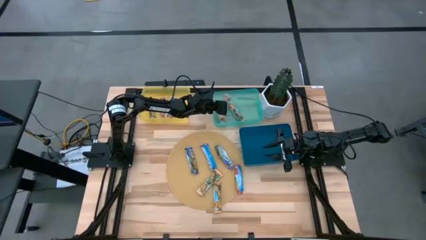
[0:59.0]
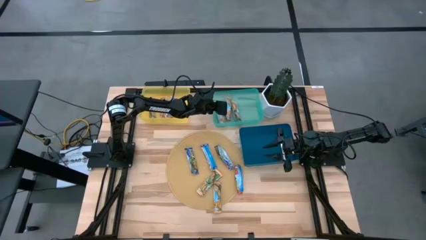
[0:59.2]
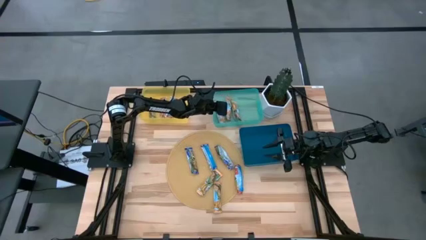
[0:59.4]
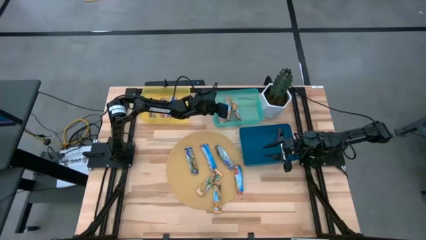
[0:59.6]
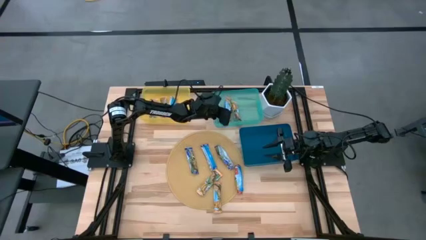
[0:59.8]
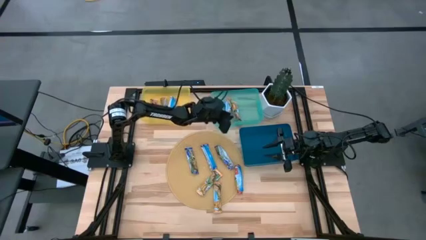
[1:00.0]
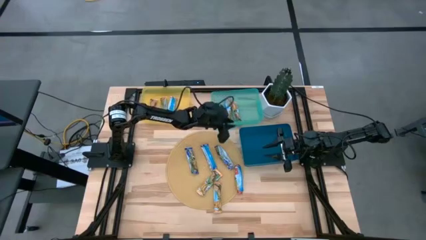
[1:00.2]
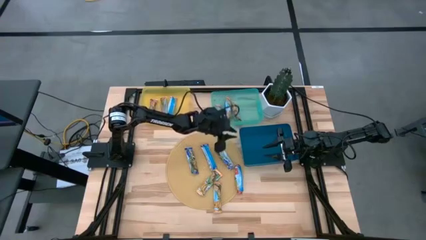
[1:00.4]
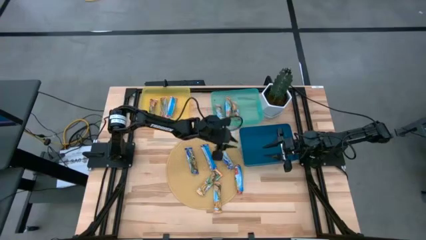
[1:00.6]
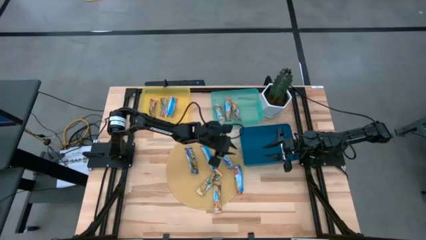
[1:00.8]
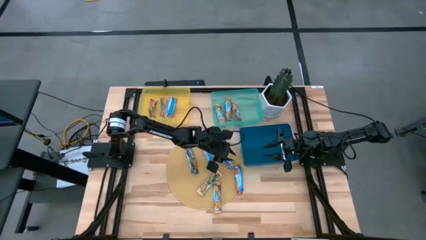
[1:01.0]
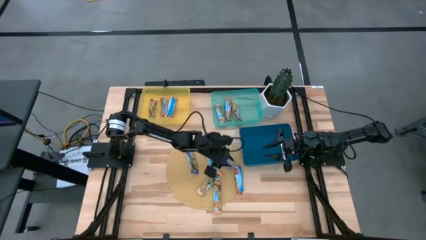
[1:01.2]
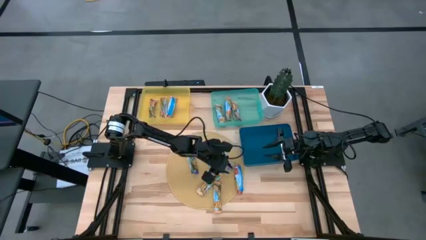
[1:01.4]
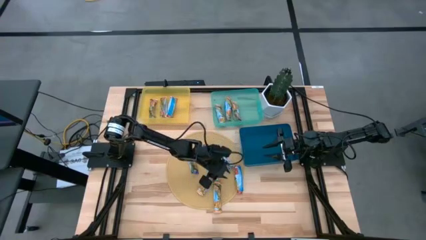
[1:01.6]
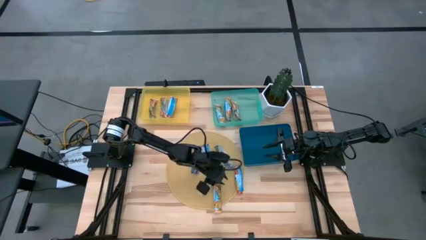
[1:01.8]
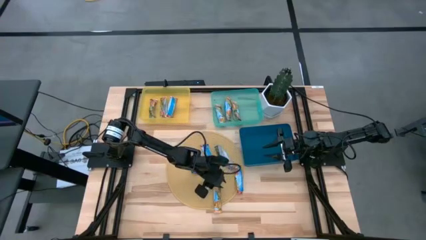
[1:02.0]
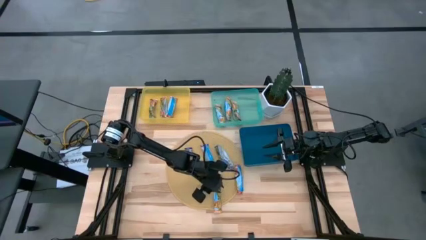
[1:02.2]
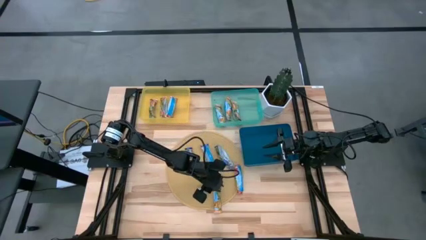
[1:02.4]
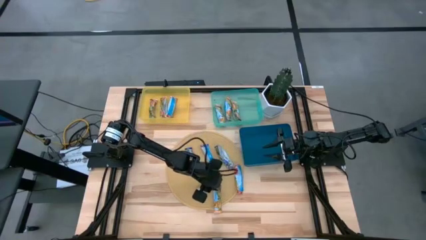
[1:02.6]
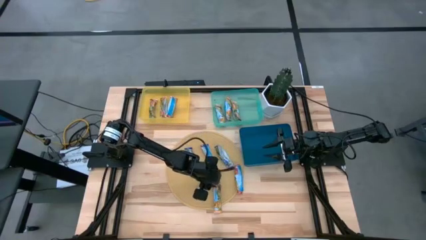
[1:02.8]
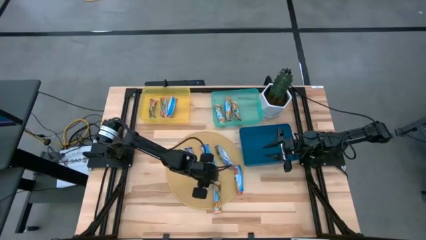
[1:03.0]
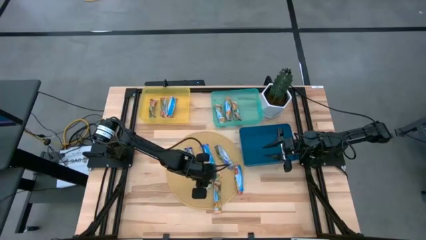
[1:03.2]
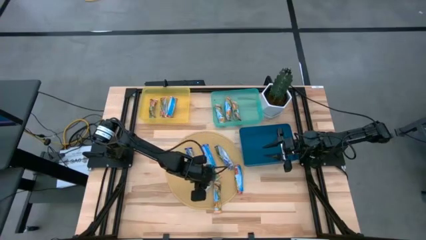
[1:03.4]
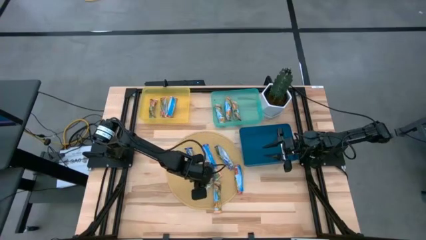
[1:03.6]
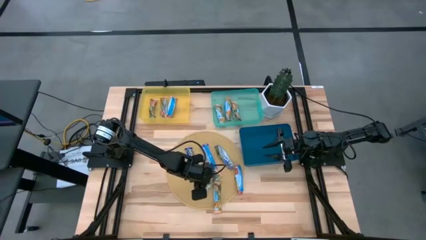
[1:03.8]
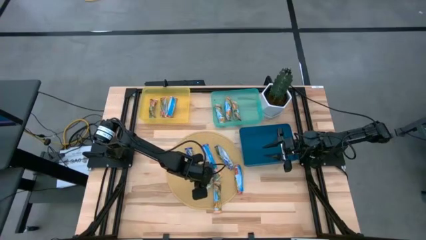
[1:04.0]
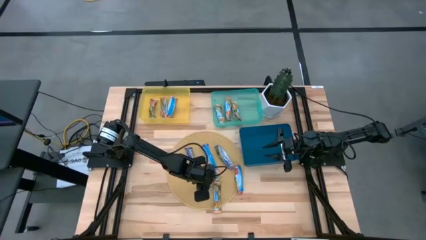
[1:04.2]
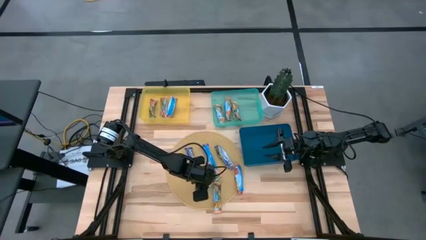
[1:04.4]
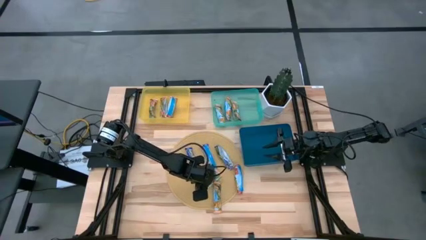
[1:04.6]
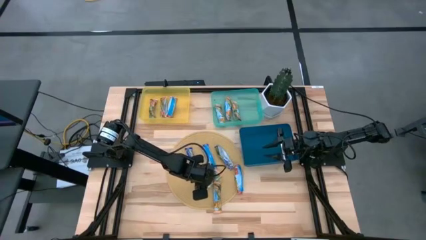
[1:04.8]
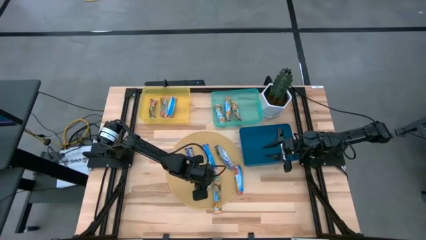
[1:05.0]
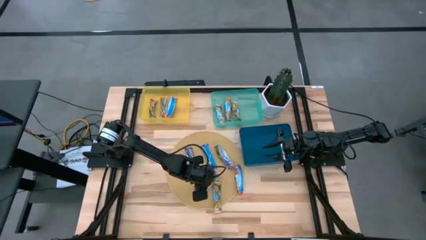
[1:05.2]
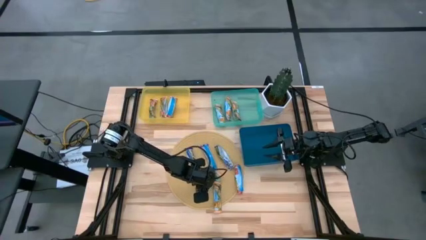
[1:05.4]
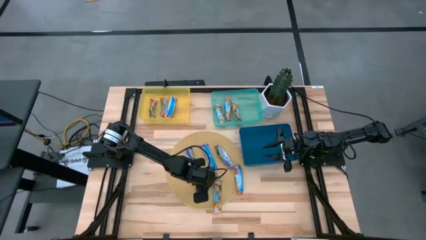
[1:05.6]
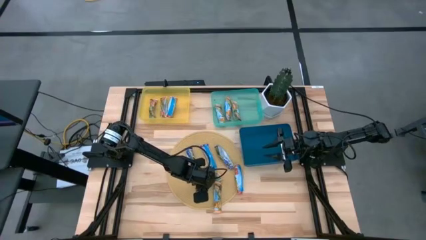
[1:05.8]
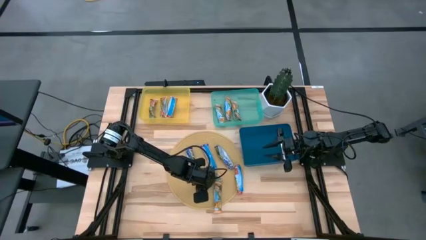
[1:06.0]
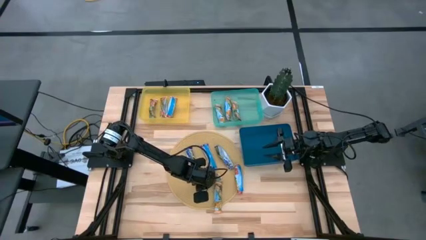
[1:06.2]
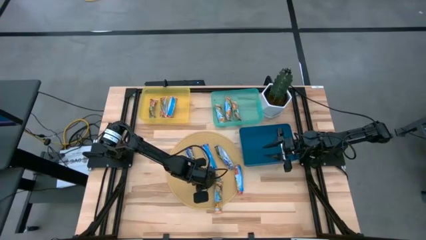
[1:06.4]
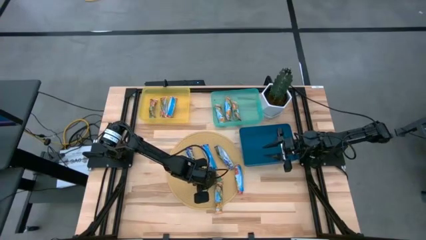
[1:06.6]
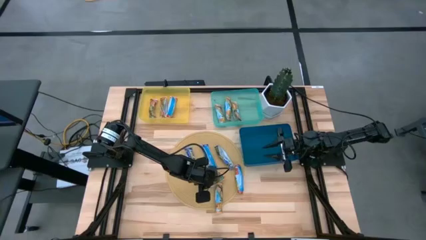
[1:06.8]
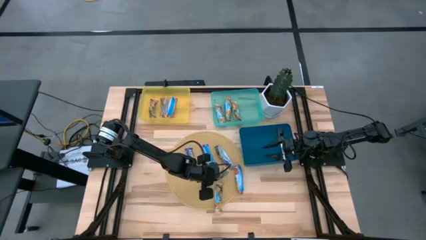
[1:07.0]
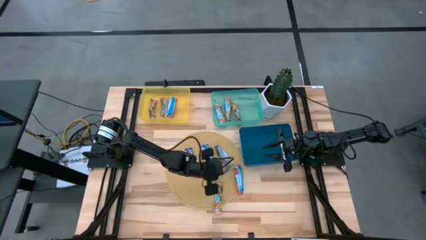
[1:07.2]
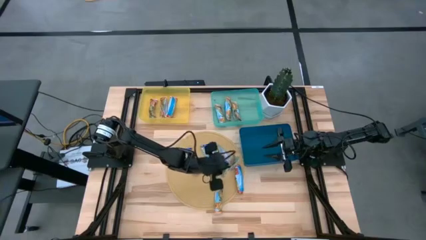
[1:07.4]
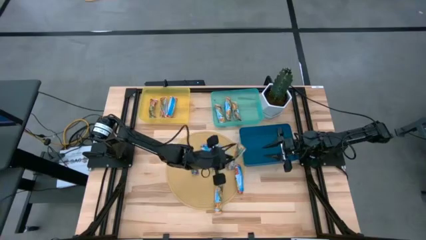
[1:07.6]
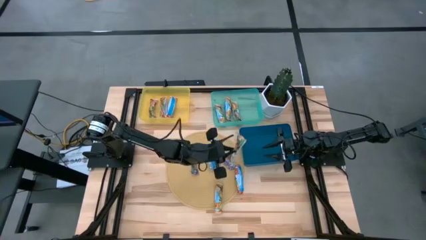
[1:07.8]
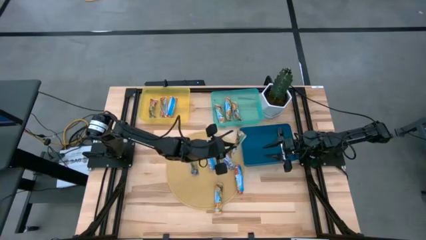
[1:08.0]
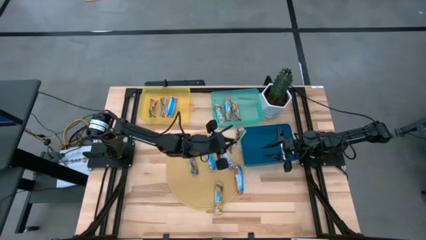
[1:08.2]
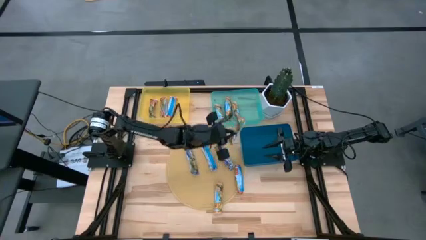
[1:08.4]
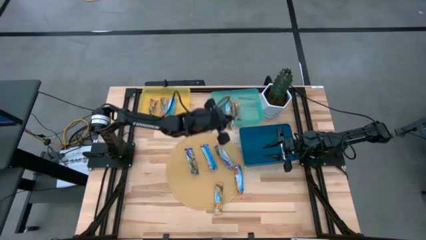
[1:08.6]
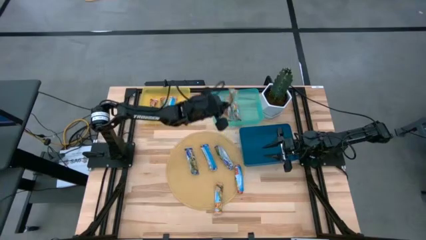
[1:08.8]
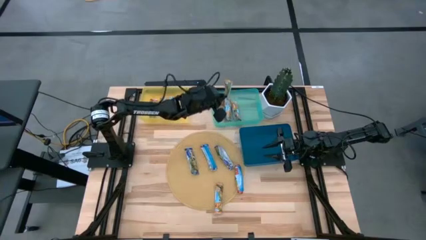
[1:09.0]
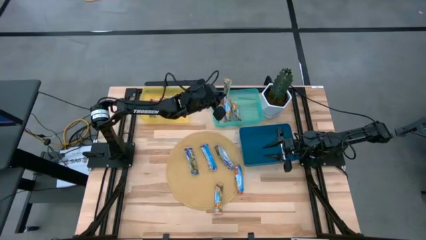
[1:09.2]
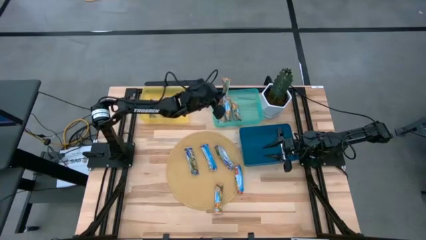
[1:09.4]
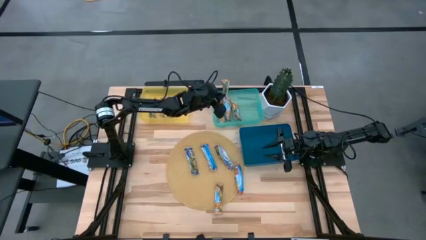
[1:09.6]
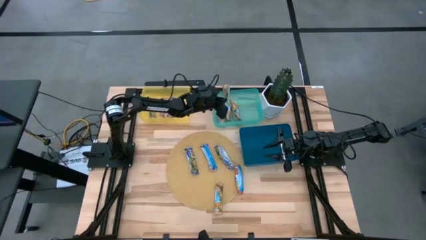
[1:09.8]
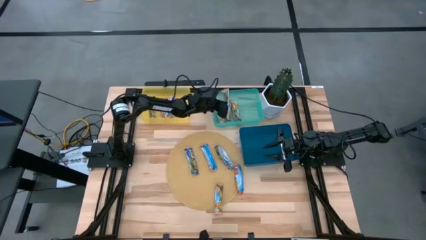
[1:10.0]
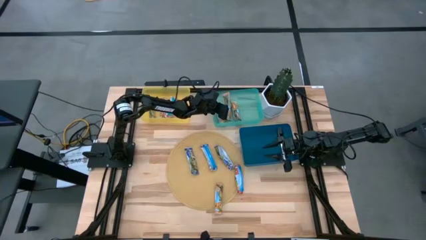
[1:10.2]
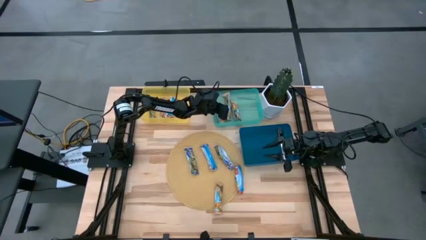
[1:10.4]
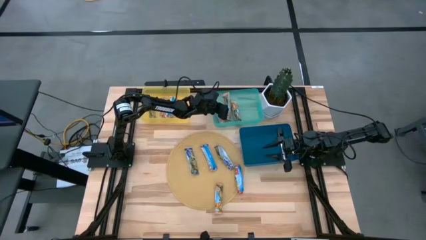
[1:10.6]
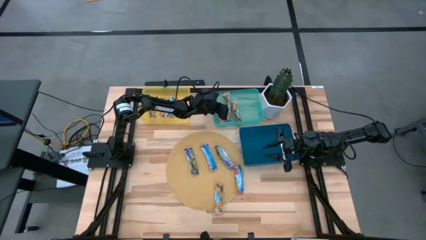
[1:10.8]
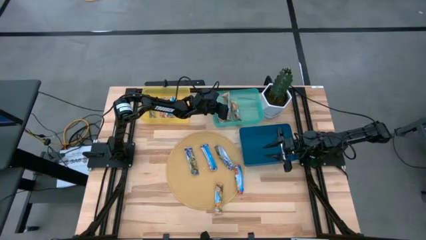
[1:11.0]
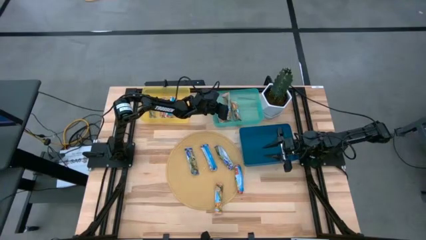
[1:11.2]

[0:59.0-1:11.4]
Task: Pick and place Granola Bars by type
Put the orange granola bar into the green bin

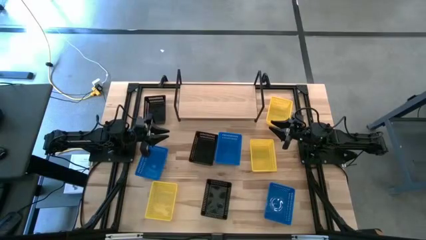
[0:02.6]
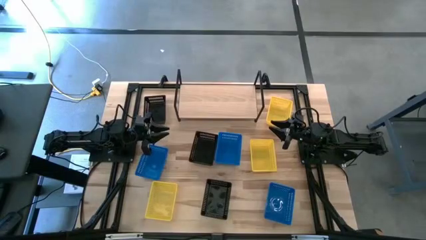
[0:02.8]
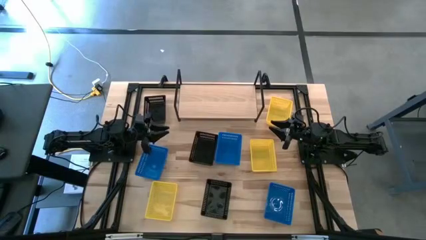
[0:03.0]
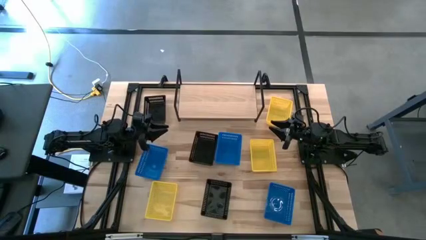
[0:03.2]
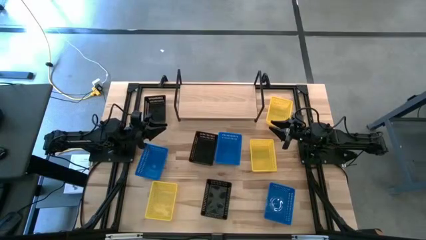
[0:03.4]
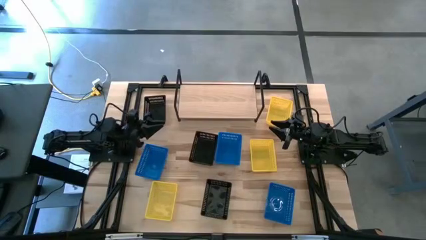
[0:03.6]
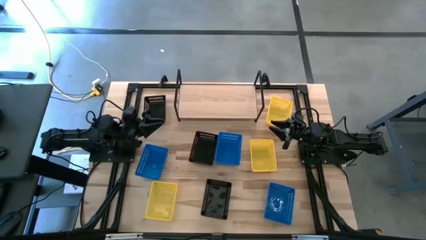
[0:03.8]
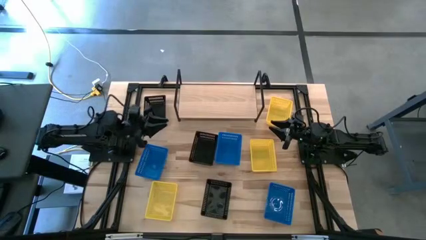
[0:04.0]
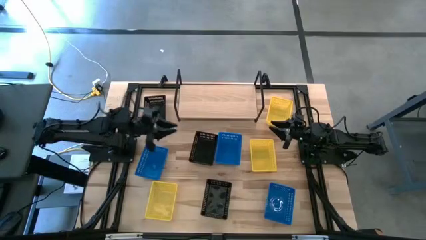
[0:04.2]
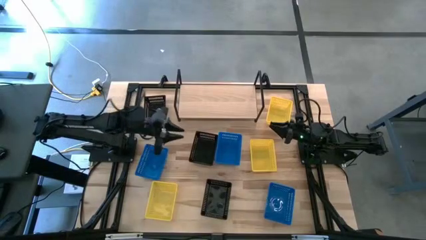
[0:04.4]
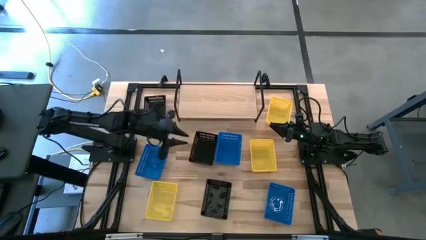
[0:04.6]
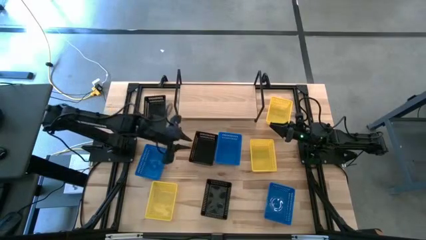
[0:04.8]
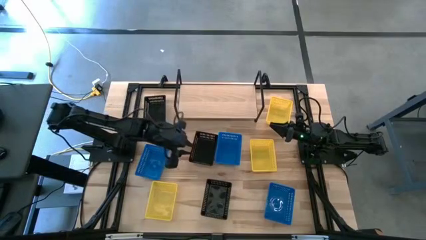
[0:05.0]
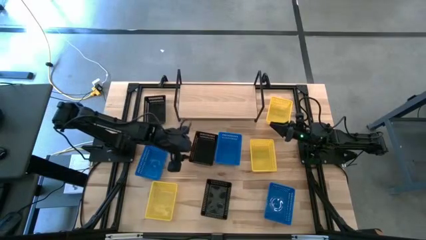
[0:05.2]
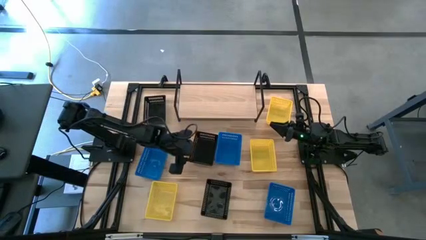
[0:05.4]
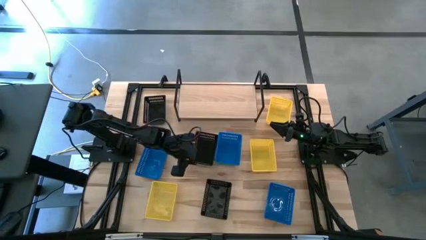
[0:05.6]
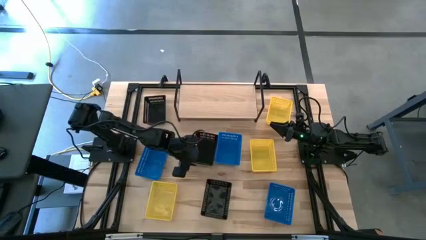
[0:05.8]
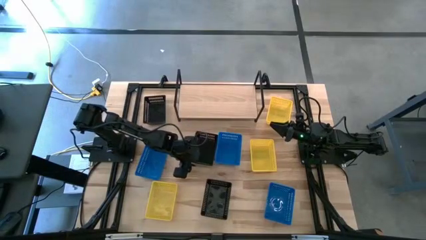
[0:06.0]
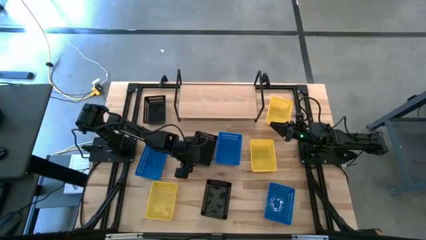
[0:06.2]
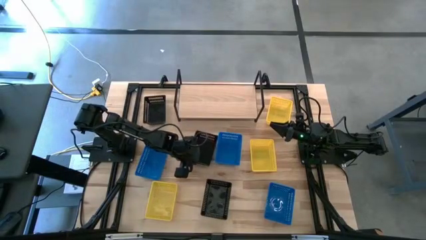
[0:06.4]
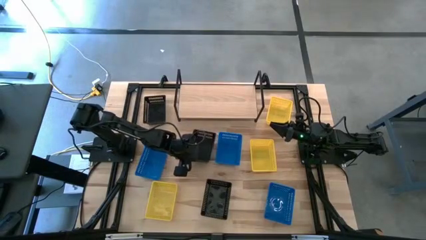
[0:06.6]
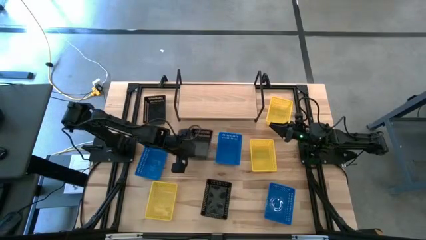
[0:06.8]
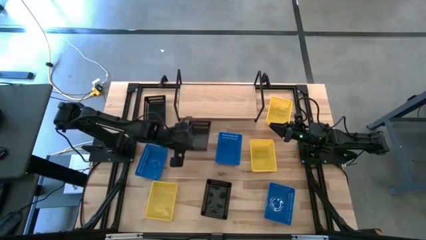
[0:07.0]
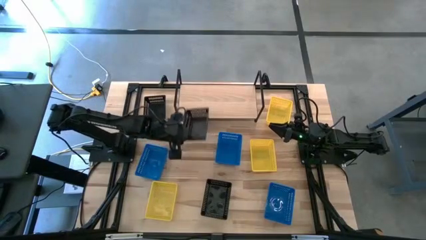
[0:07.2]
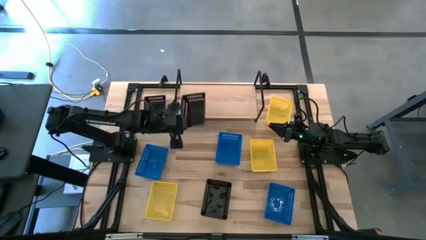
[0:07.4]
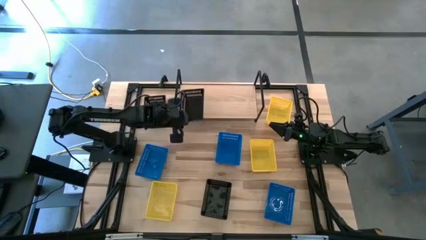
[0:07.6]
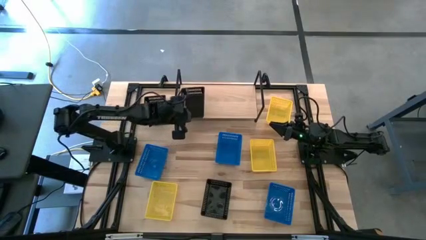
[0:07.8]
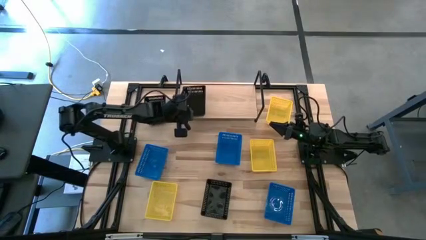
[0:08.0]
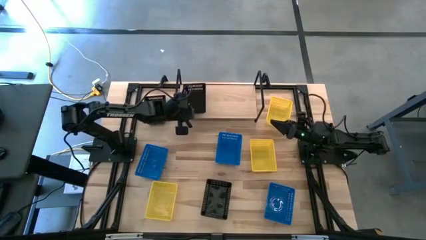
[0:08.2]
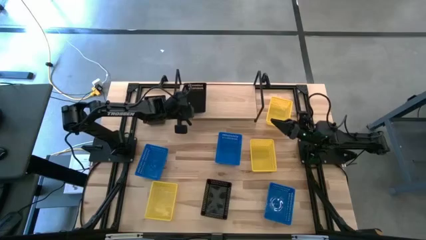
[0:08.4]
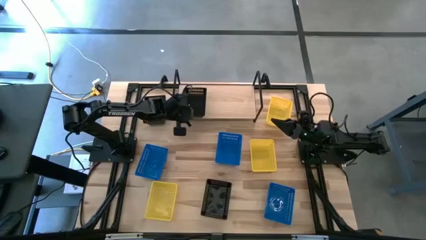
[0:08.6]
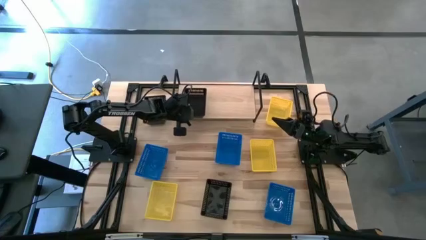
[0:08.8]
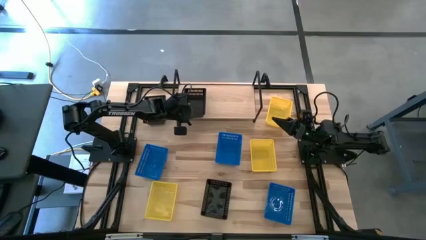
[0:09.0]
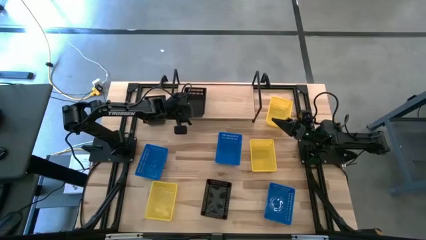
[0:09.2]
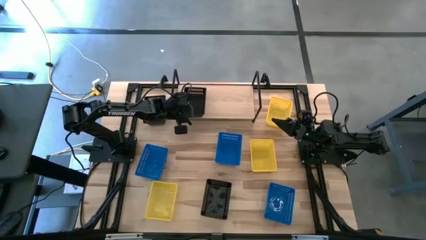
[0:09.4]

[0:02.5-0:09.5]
Task: Stack baskets on shelf by color
Put the center black bin on the shelf
